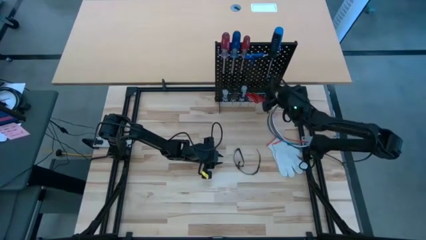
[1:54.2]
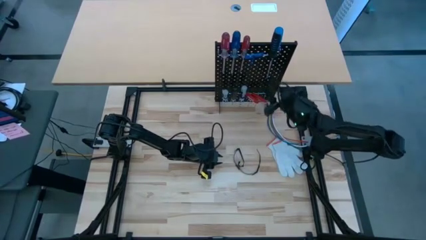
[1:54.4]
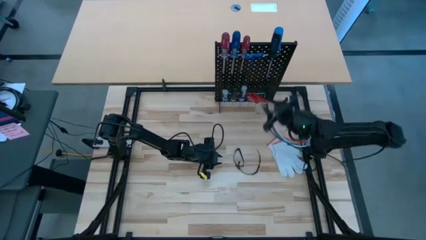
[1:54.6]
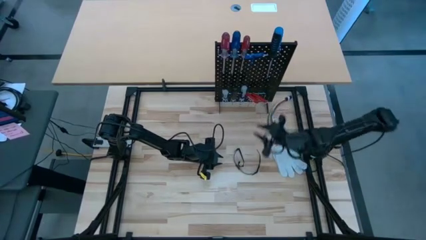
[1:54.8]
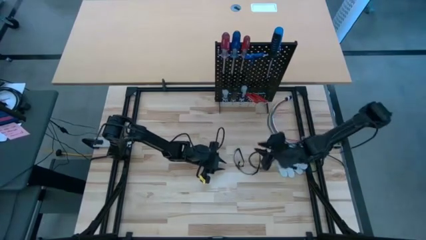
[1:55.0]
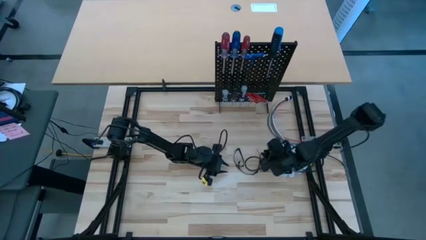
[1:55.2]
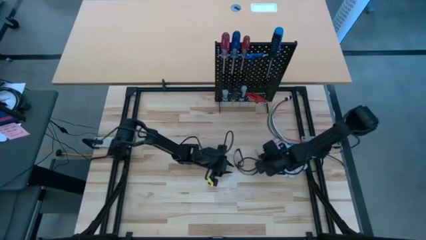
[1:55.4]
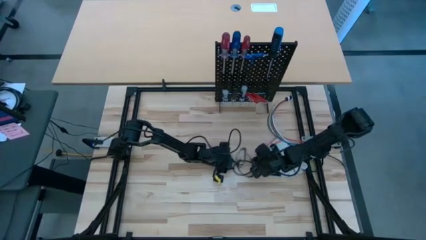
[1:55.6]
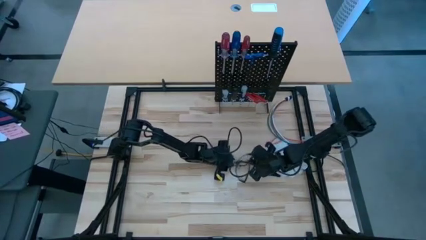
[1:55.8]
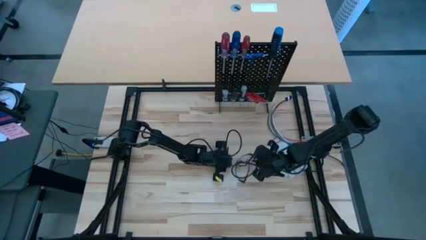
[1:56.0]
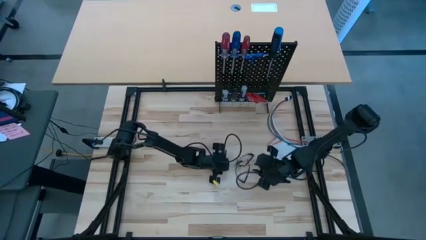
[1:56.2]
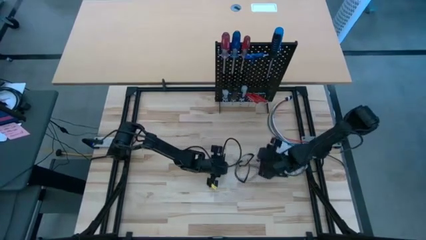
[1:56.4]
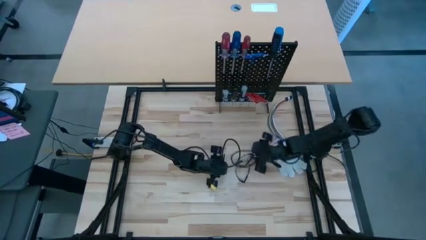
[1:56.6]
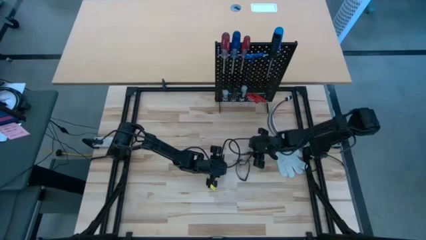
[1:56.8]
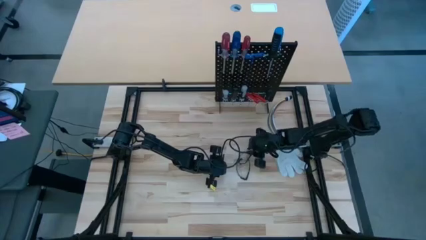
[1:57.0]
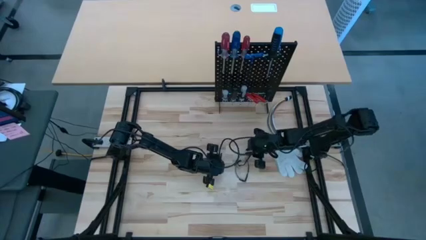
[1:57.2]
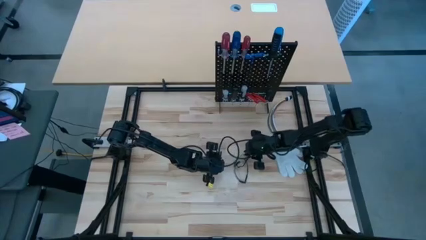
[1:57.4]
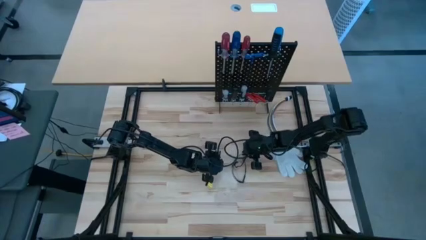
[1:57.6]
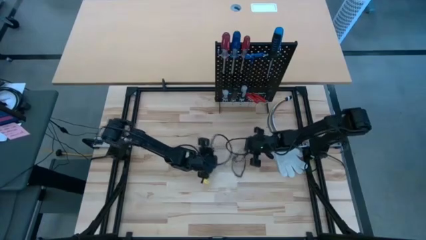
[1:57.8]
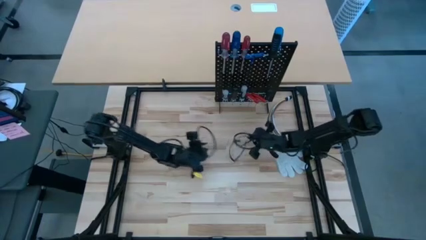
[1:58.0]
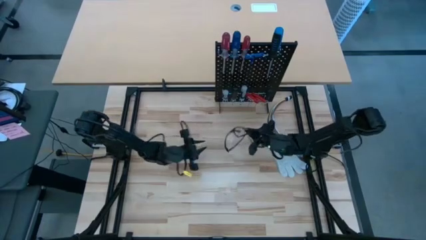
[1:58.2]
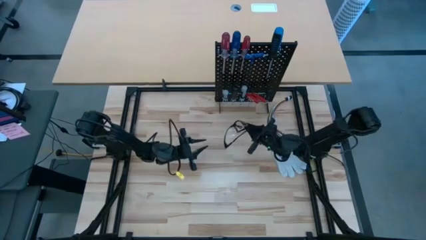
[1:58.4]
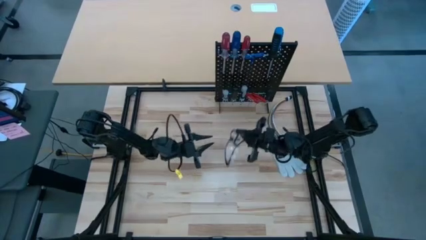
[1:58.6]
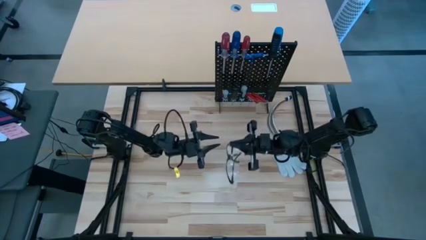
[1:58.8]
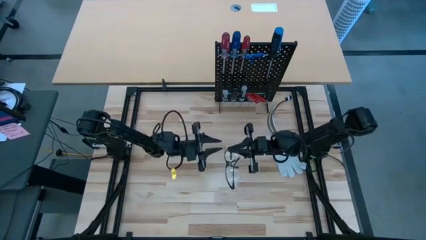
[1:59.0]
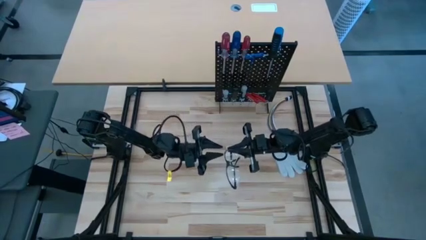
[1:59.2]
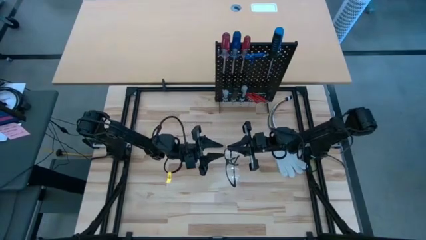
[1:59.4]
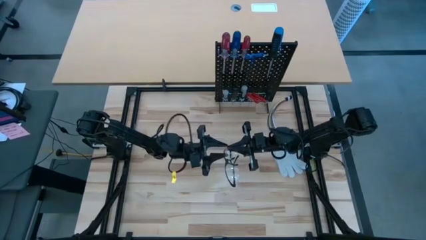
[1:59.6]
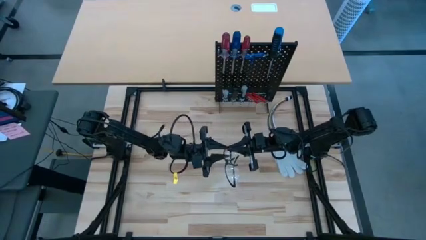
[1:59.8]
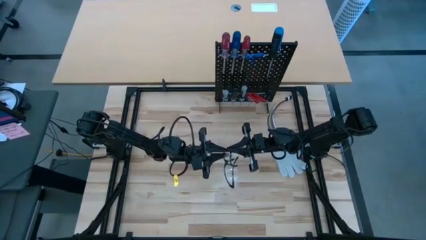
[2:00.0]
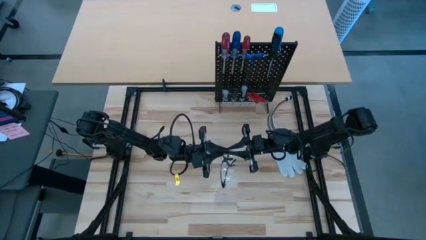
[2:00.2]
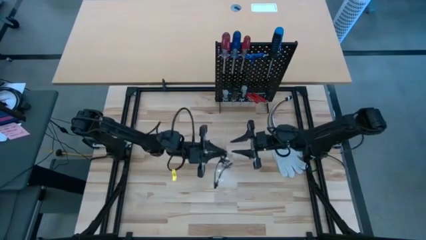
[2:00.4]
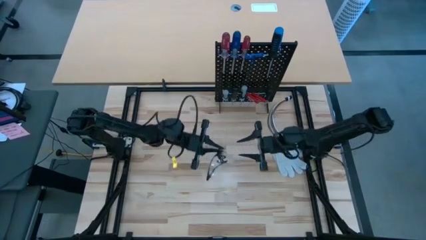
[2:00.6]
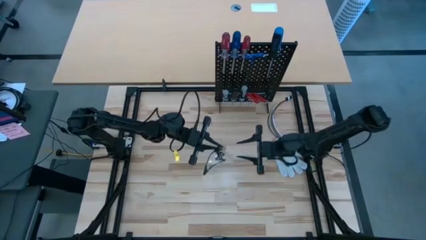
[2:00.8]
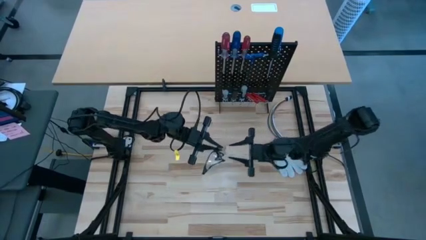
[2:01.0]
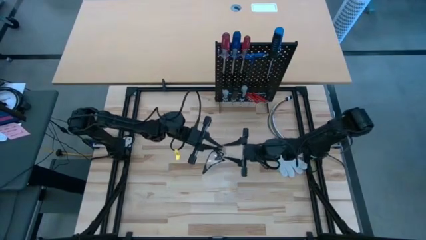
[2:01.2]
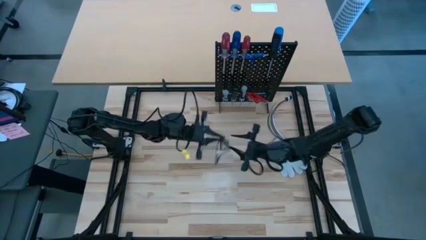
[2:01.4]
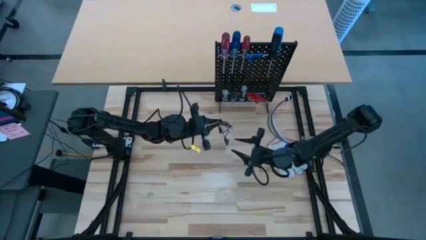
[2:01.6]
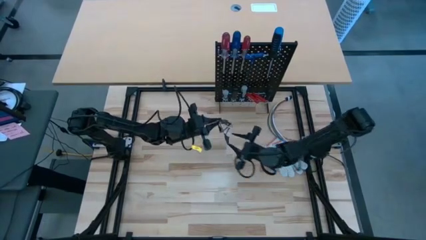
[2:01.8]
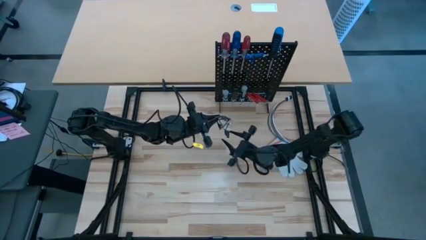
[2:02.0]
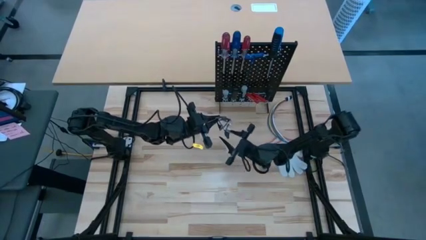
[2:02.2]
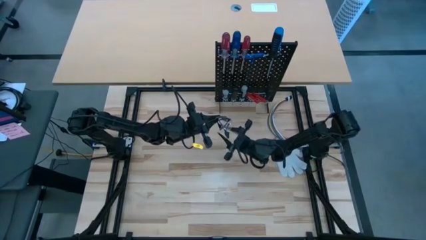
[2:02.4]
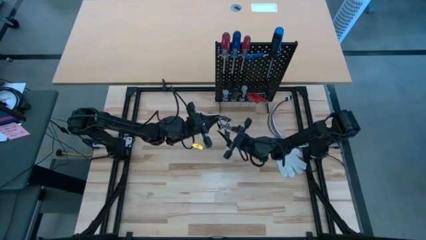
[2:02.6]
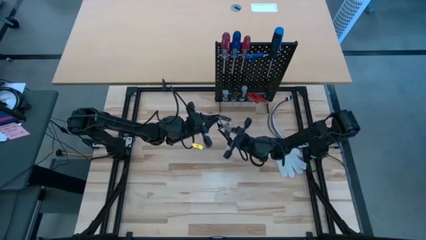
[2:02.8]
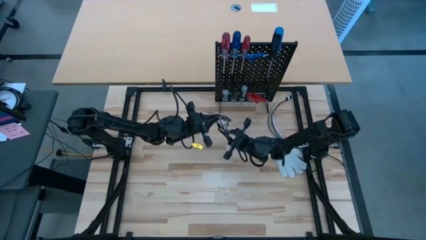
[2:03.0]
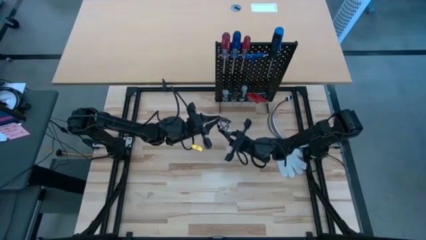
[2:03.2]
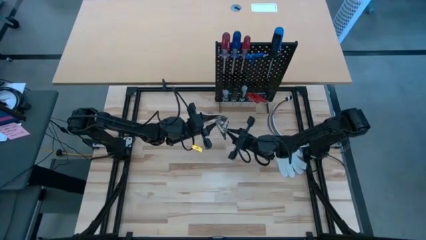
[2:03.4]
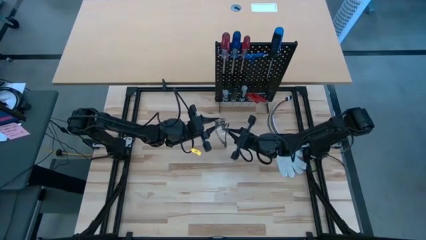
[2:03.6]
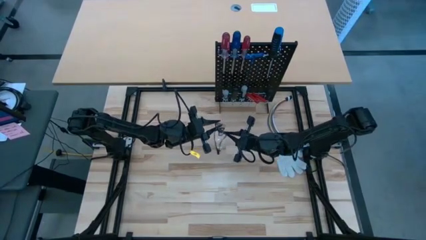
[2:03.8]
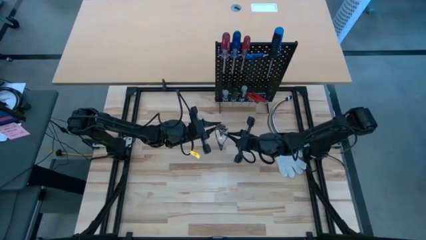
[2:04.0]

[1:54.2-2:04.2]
Task: Hang tools onto peg board
Hang the safety goggles on the pegboard

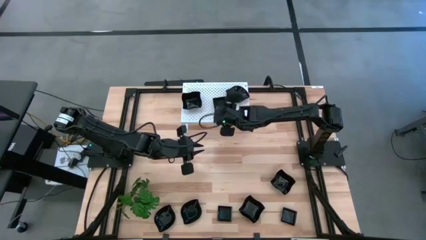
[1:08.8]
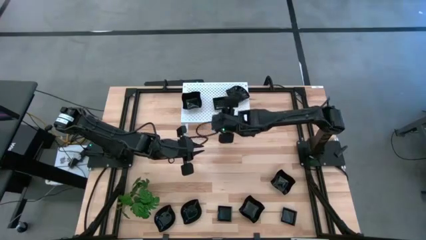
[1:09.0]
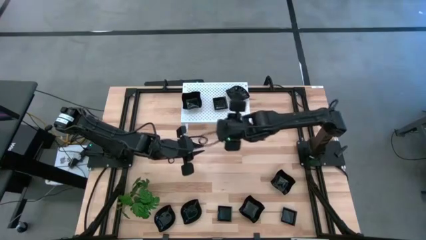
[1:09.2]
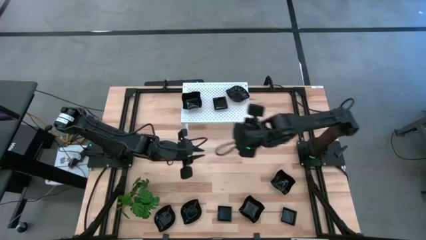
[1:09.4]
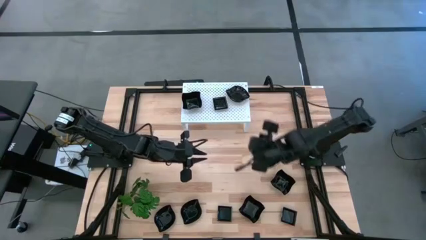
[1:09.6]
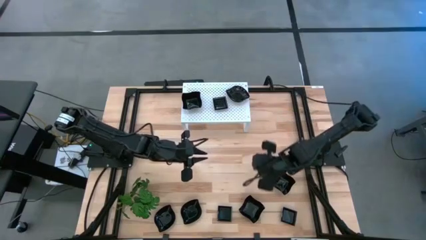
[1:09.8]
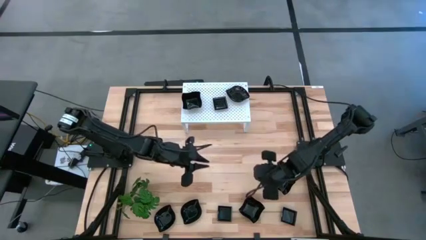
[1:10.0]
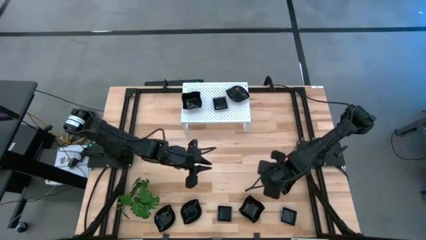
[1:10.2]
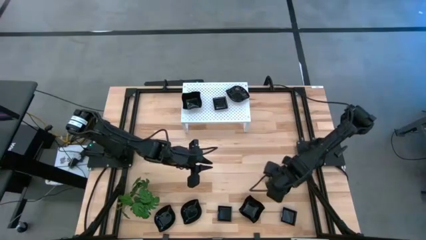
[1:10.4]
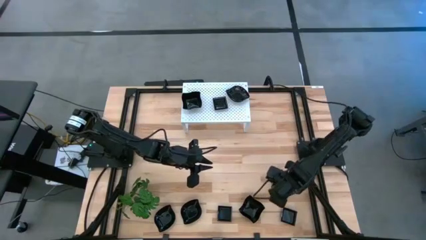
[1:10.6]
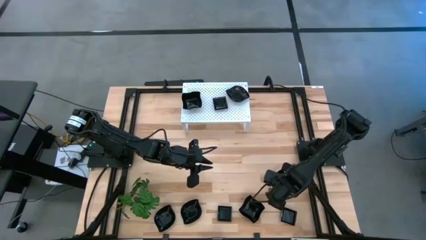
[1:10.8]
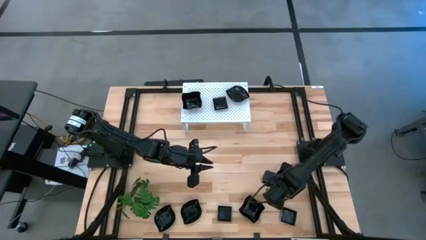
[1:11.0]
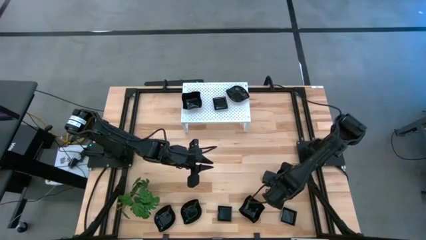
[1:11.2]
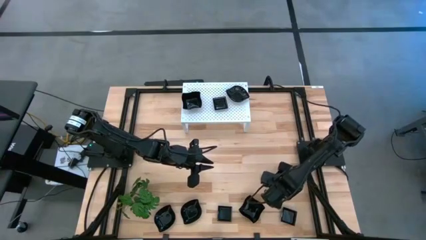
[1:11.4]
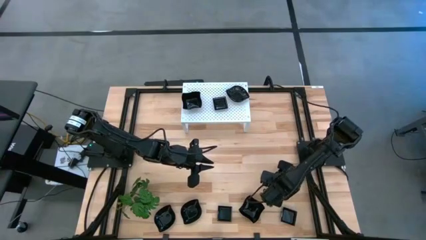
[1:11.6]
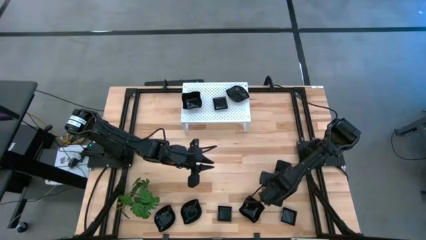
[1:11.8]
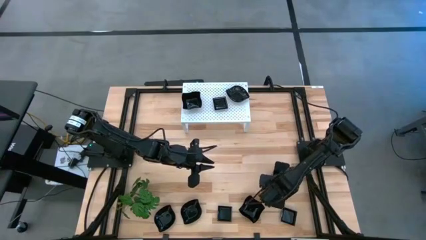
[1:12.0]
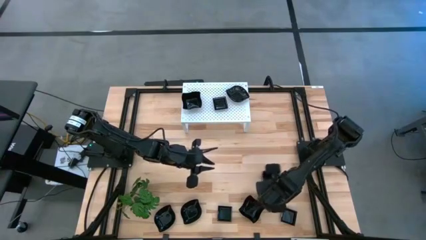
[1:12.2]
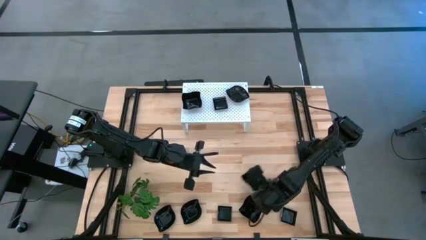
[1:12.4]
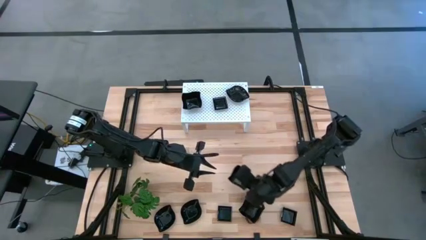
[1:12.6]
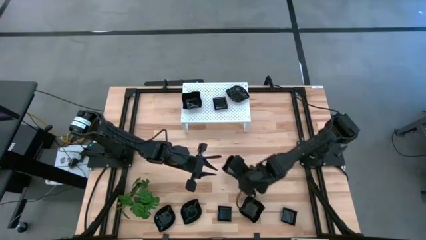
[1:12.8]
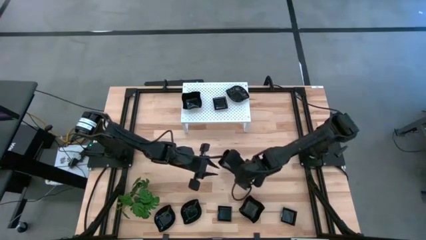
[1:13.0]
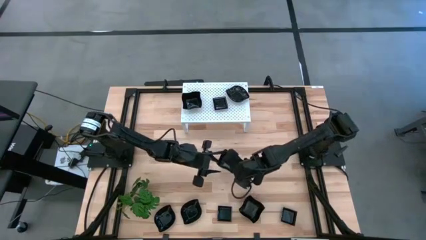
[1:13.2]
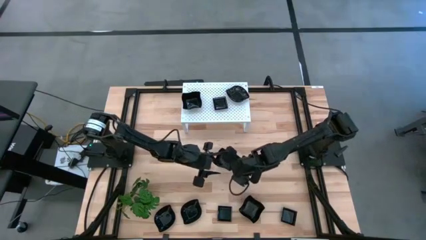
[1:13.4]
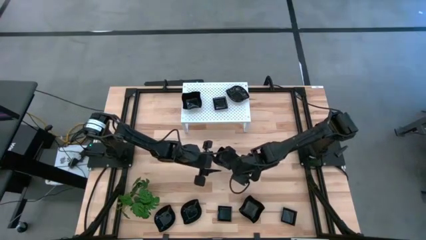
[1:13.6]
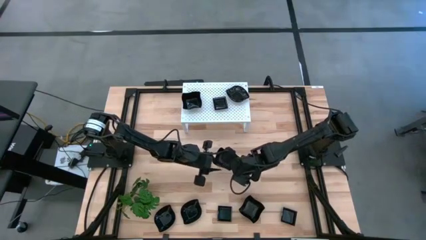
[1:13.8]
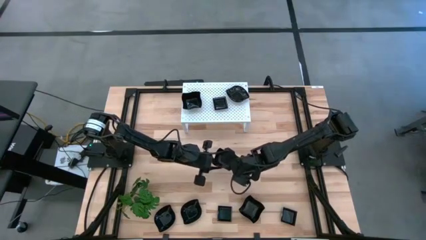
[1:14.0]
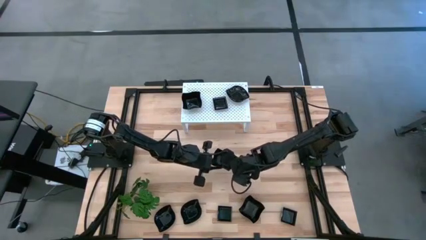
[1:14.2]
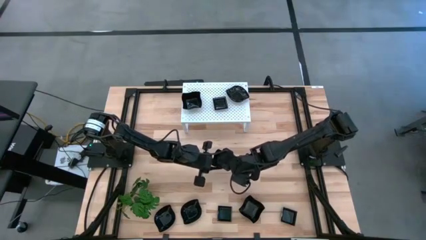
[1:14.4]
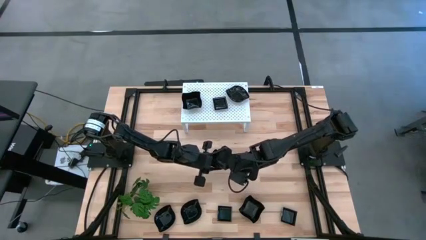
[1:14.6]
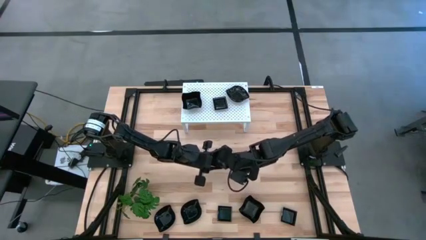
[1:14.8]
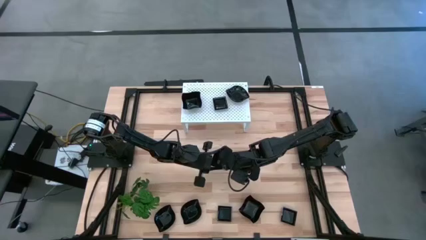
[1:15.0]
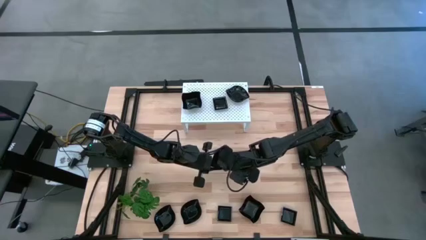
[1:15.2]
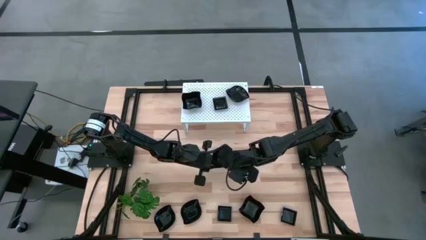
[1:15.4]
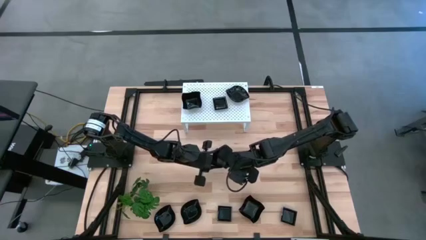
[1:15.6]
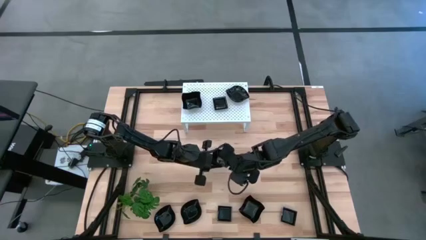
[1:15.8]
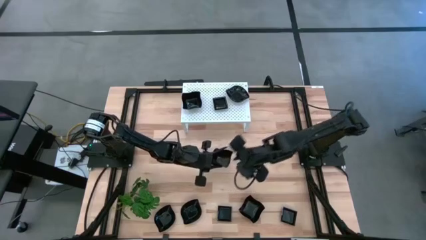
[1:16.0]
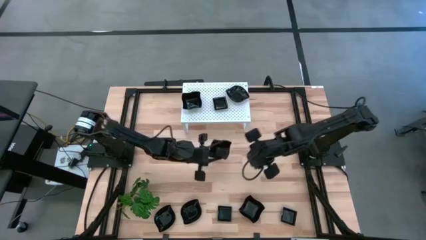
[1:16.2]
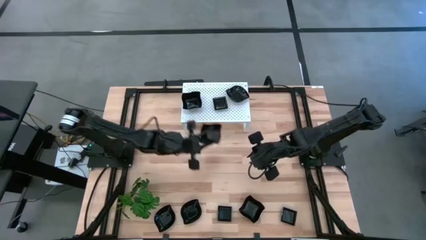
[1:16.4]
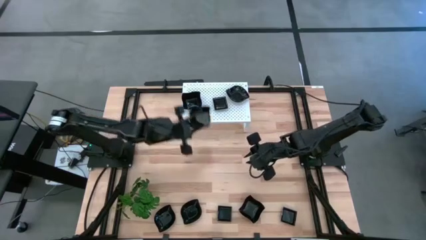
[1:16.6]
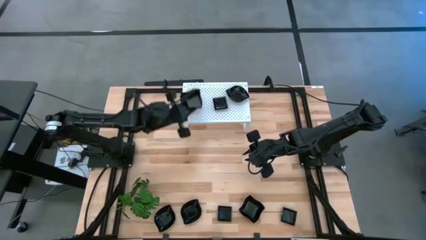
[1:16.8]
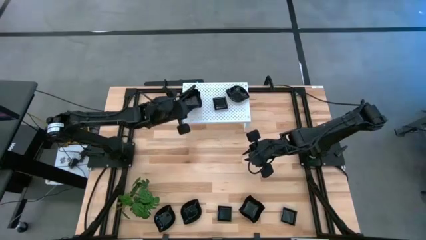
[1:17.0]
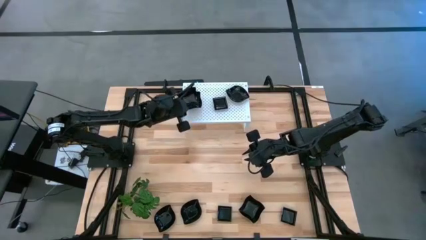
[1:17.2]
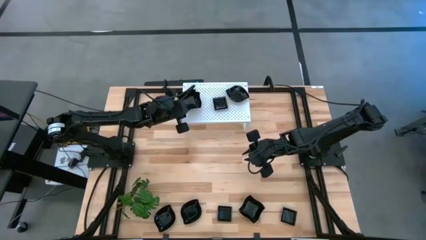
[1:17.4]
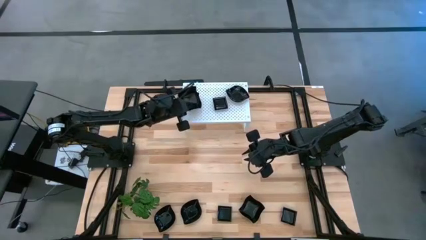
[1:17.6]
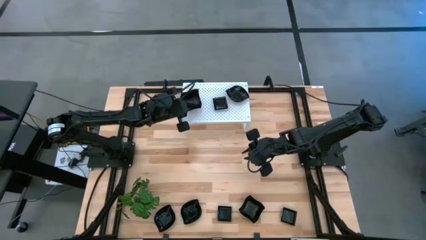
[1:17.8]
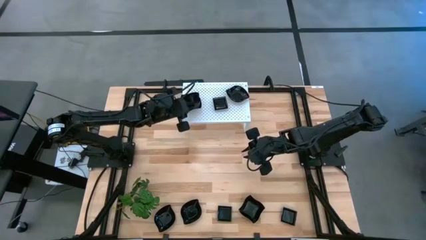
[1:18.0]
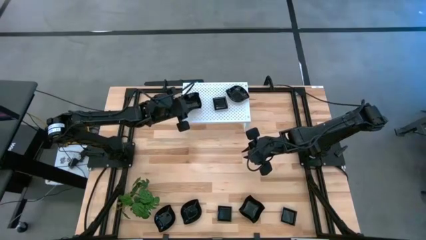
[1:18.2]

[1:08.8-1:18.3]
Task: Pick & Place Mini shaped plates
Stack the distorted square plate on top of the other distorted square plates on the shelf
